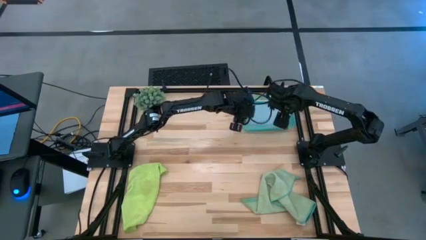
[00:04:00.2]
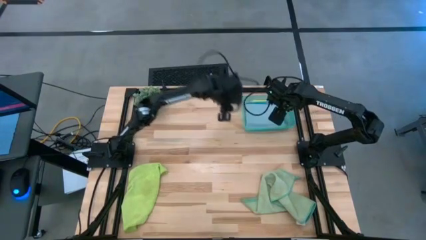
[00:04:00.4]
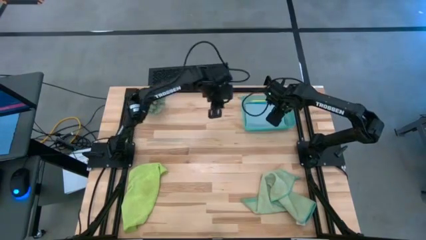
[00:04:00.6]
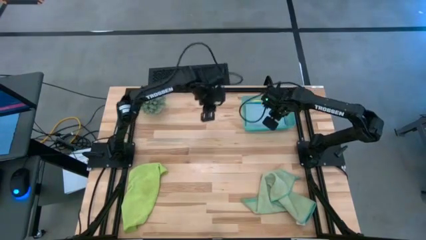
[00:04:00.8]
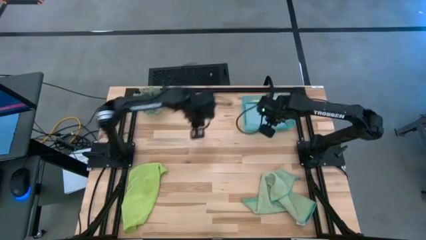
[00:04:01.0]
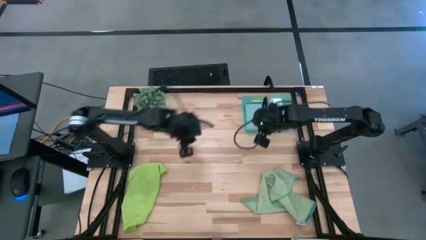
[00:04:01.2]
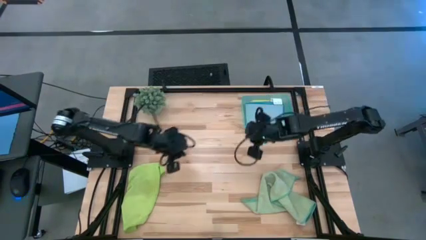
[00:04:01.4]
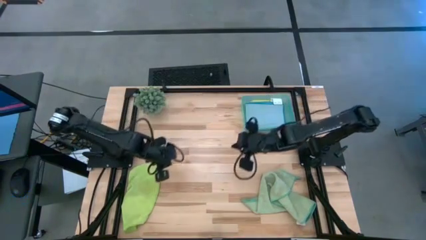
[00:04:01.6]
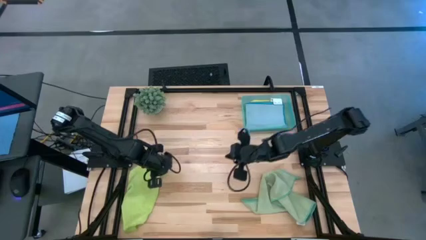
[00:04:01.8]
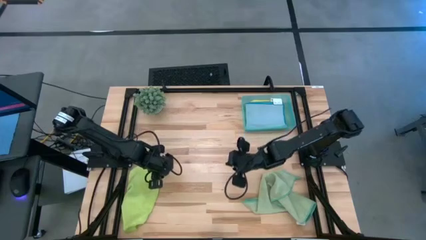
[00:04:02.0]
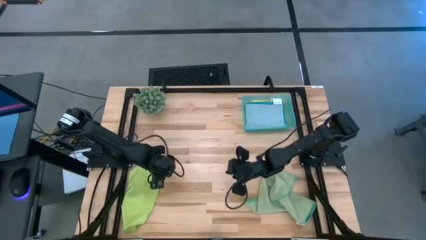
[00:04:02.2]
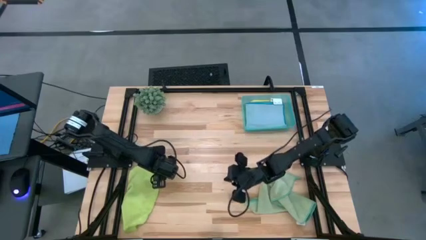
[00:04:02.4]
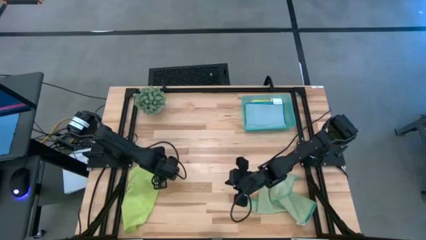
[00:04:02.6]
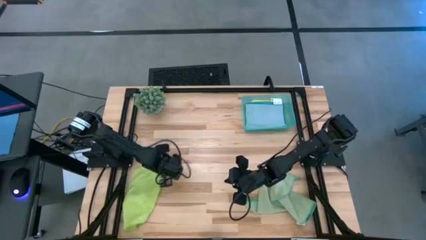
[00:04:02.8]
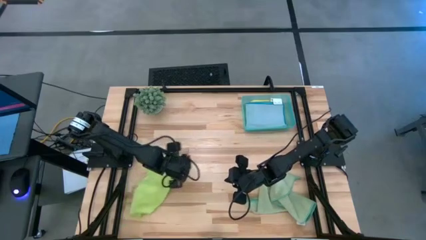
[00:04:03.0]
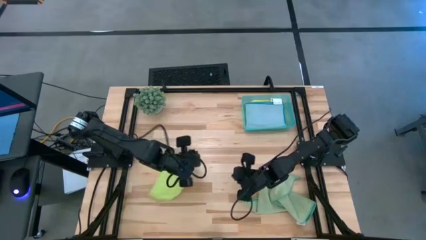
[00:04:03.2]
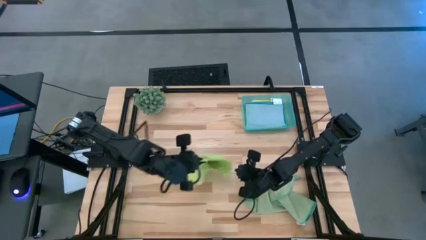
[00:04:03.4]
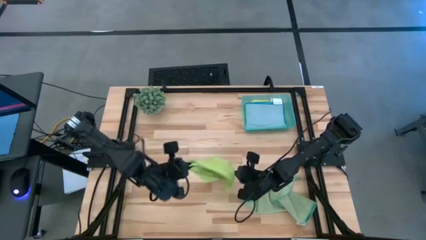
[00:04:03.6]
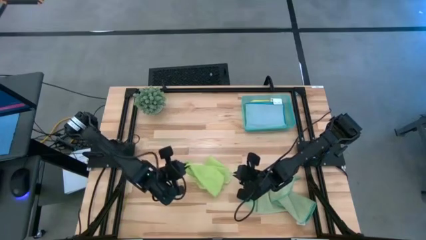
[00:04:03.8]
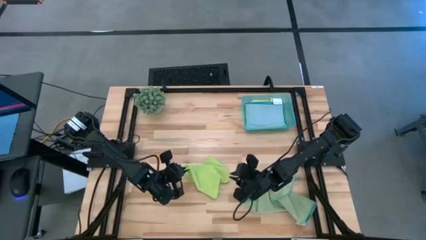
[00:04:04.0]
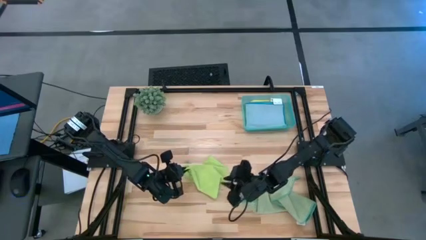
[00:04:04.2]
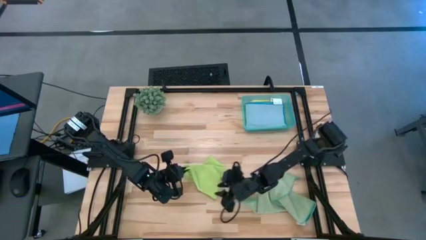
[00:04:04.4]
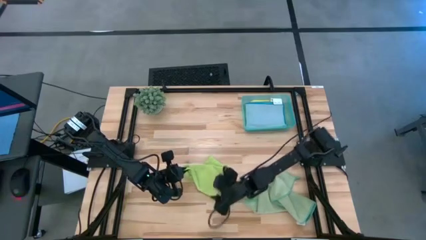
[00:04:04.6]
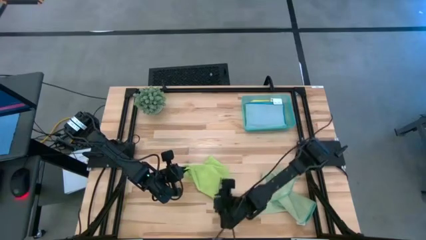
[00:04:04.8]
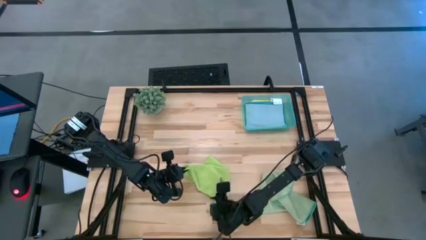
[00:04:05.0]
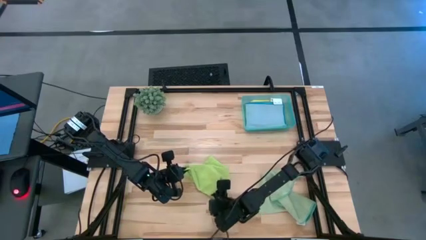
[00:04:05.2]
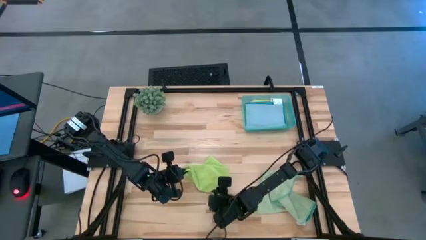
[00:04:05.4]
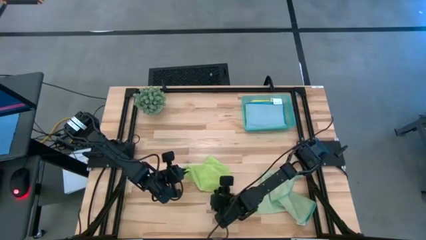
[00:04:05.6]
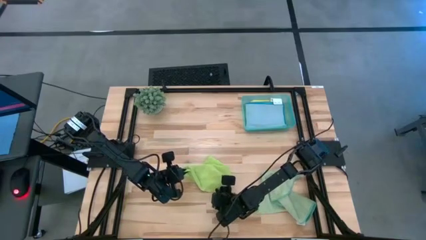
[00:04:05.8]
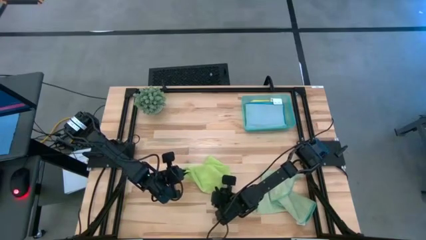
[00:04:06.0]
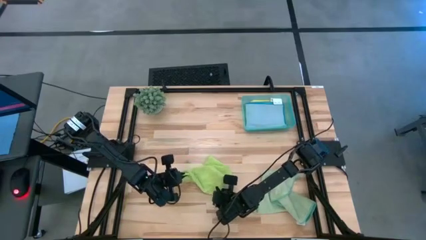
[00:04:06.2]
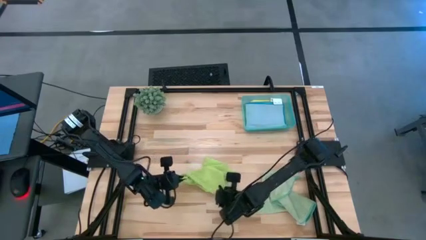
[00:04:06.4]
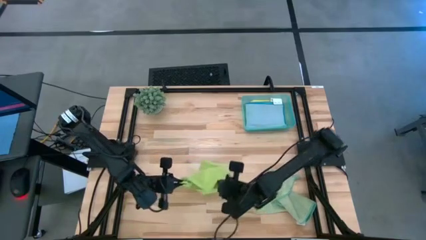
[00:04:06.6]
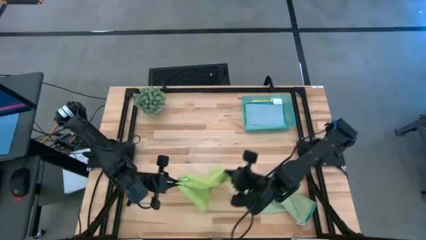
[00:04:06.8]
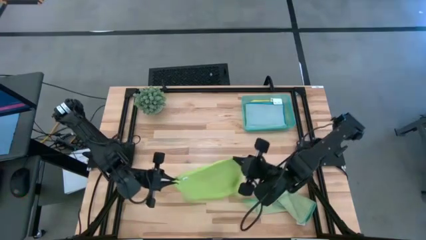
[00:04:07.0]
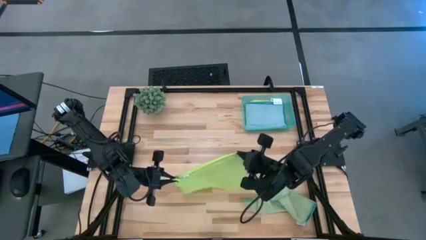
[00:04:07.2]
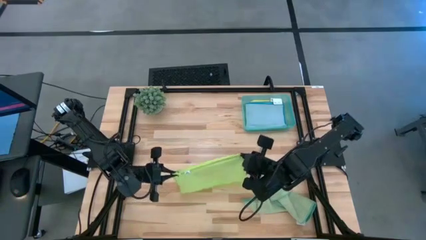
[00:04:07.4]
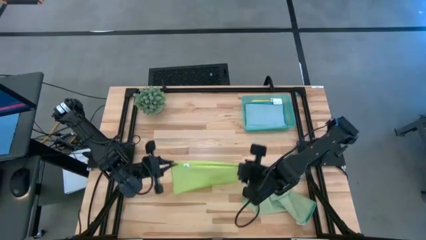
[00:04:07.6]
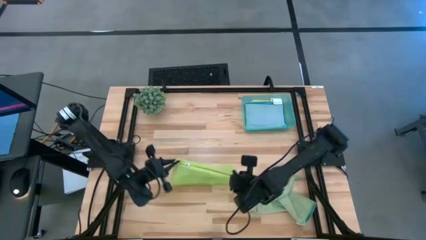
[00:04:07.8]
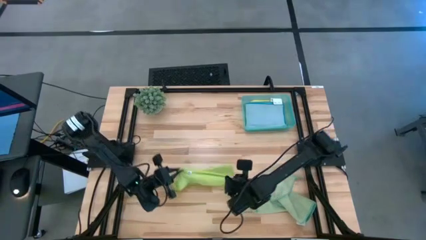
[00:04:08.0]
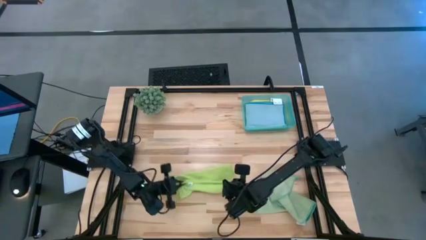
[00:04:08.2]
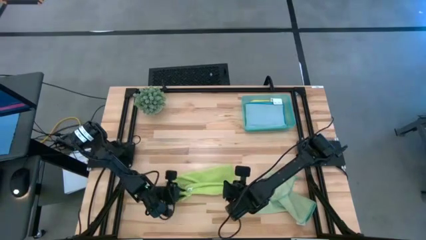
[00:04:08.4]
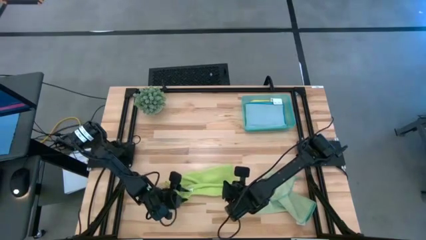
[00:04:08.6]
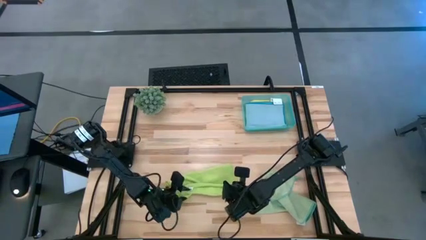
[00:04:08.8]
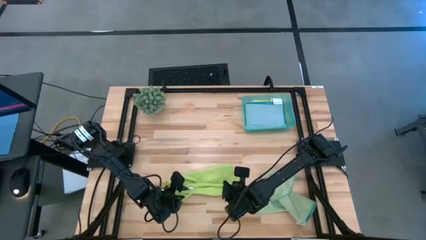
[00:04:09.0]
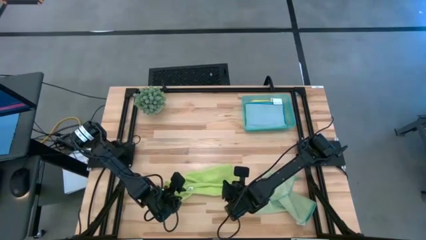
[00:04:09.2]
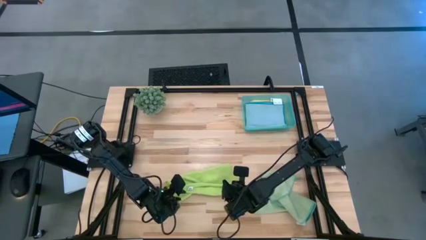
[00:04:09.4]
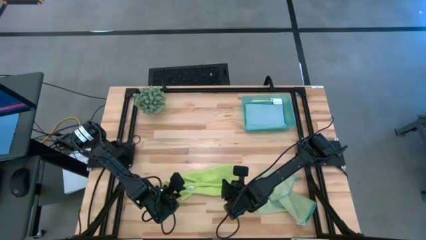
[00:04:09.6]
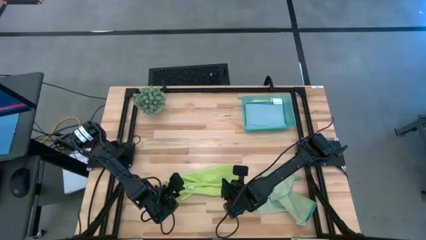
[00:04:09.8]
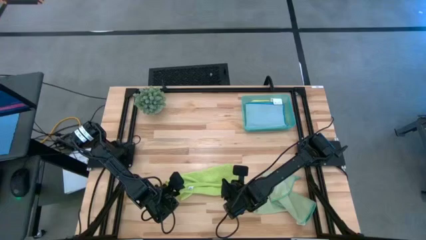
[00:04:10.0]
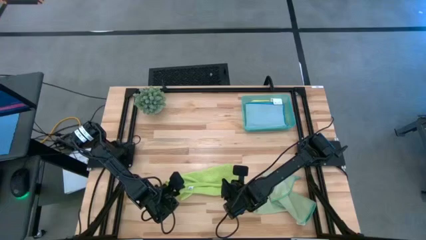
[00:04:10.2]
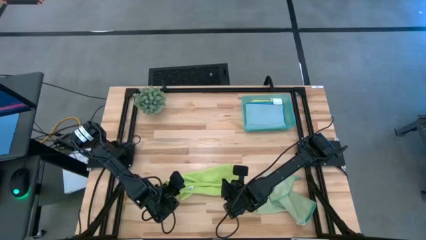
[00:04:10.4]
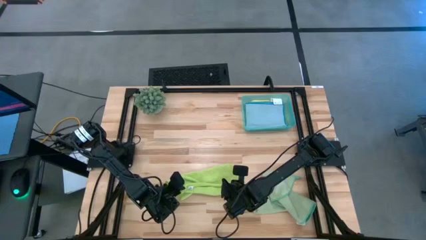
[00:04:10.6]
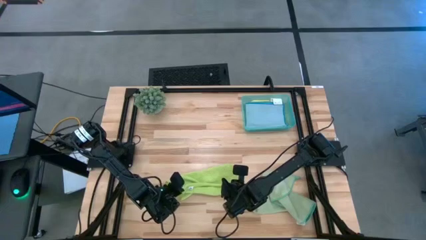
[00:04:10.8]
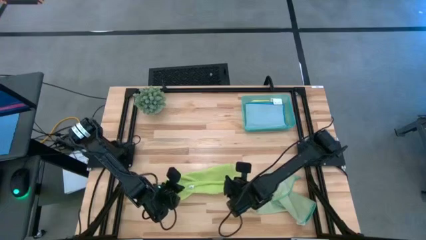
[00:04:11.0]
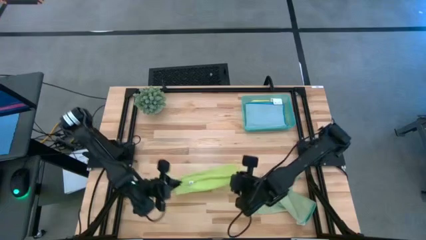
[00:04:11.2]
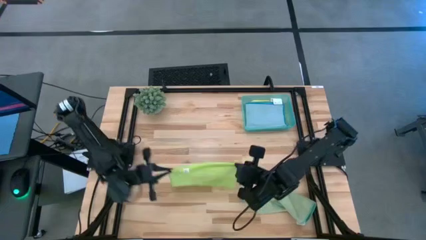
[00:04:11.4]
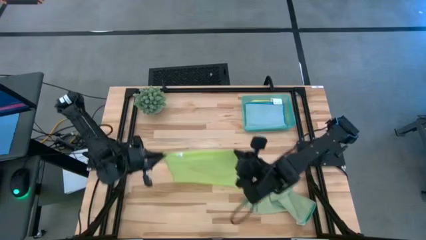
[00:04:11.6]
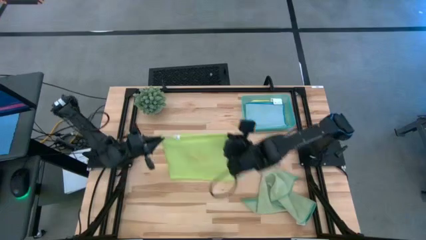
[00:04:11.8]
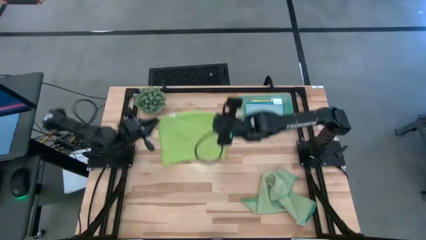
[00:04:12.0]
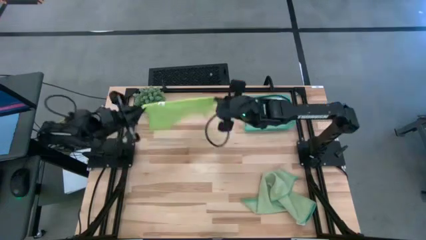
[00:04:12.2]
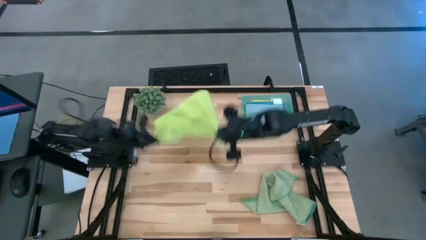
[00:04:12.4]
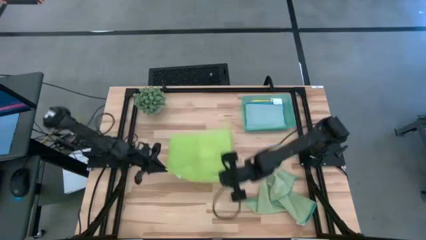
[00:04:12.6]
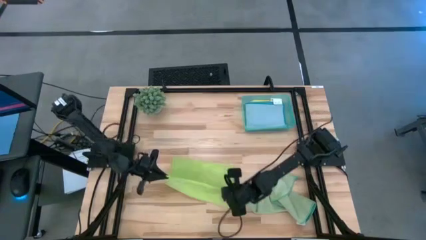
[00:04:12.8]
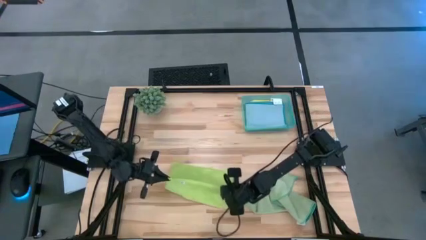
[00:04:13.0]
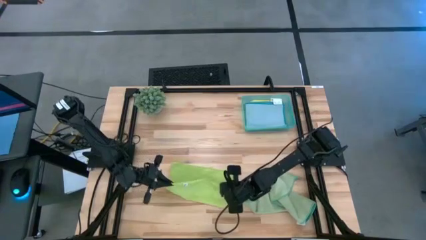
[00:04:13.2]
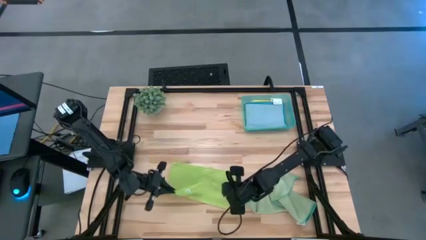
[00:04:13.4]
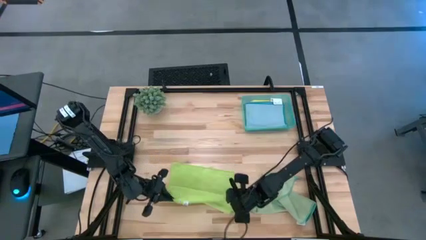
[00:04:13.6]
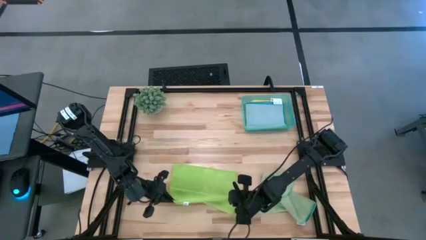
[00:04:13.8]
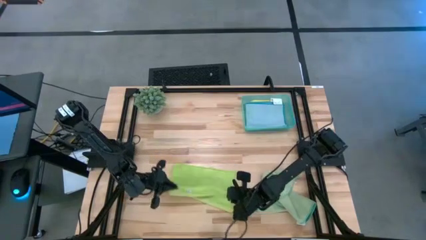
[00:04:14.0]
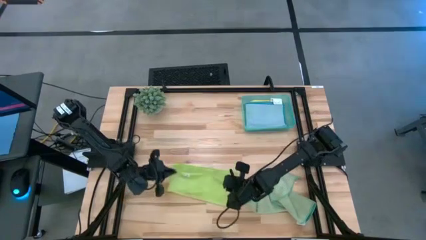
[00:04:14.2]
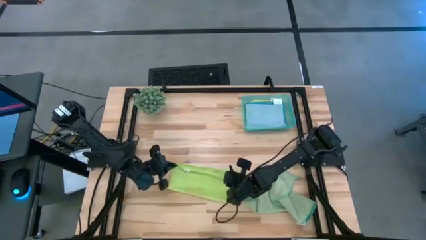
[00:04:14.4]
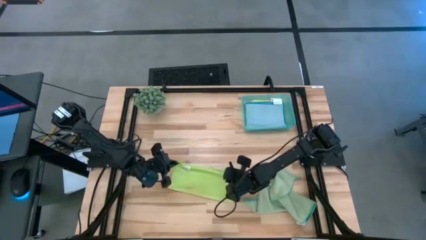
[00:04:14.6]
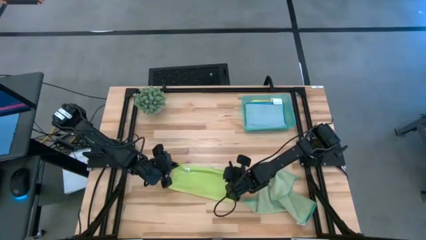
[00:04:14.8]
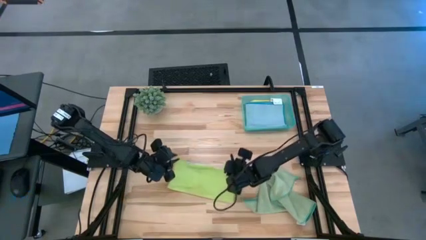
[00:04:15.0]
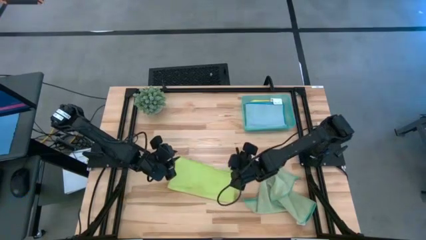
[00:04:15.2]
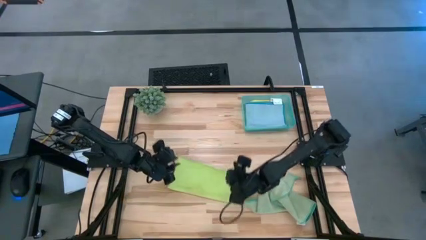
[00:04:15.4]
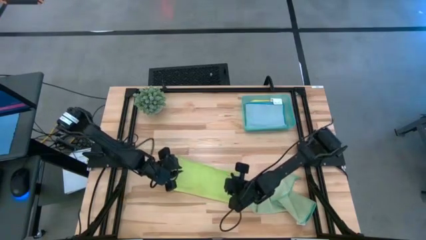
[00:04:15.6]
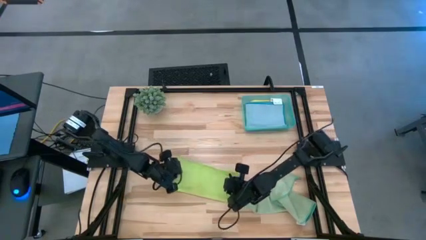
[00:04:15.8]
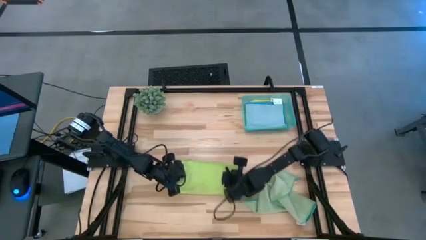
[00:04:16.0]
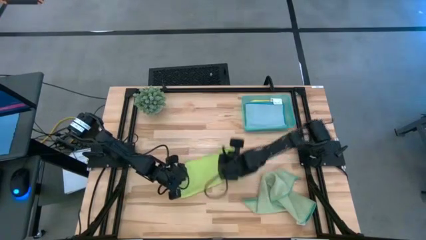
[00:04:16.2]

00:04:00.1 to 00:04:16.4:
Task: Fold microfiber towels
Fold the green microfiber cloth

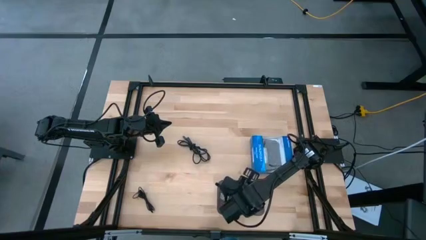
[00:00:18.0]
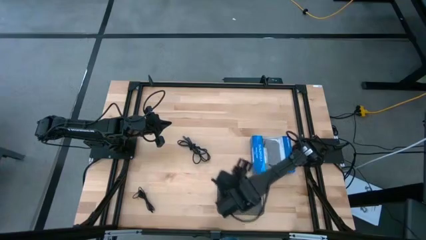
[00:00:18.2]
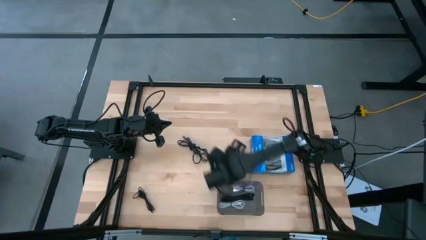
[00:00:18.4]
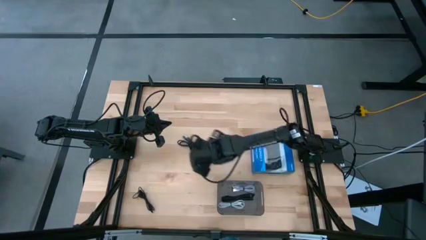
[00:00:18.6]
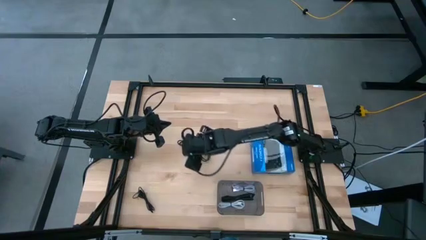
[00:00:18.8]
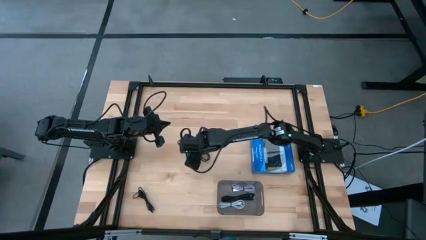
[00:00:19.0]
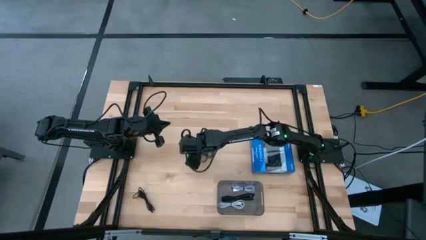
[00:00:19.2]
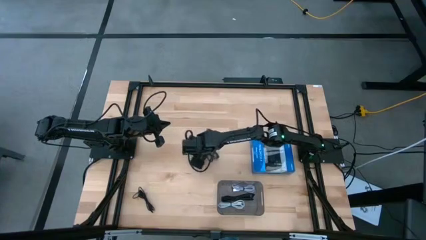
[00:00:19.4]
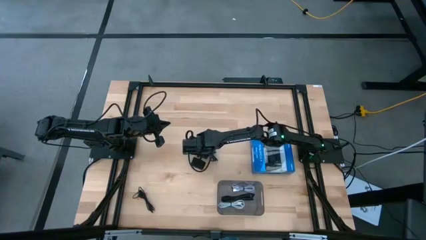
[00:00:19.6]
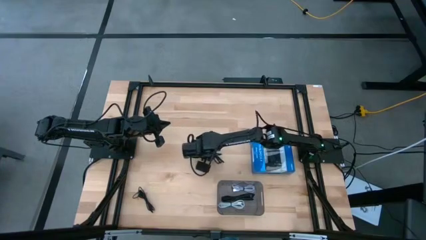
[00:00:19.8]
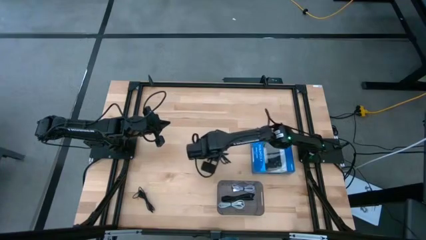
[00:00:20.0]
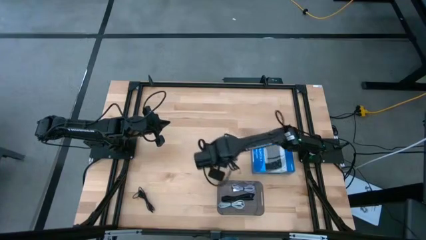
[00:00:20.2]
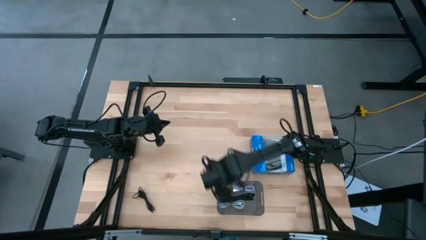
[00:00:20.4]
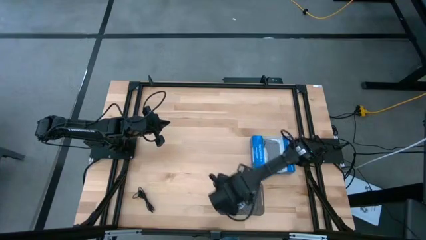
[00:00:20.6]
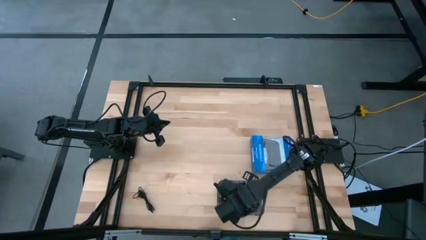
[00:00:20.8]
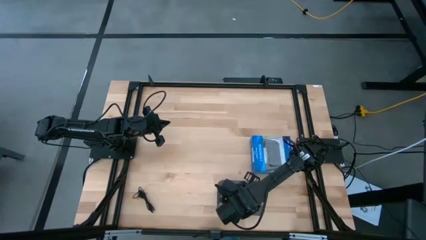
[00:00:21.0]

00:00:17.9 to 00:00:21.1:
Task: Pick and place USB-C Cables
Put the top black charger cable into the black bin
